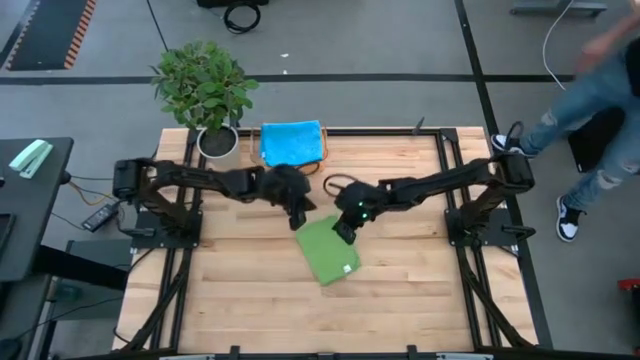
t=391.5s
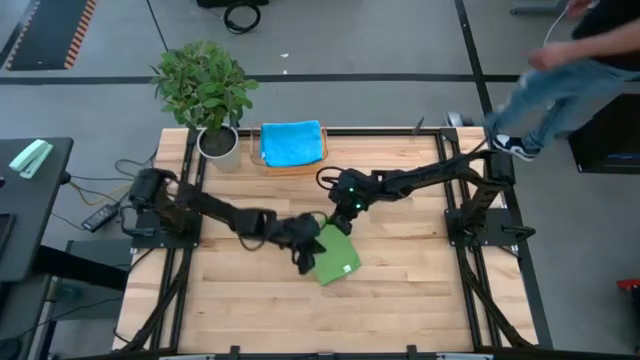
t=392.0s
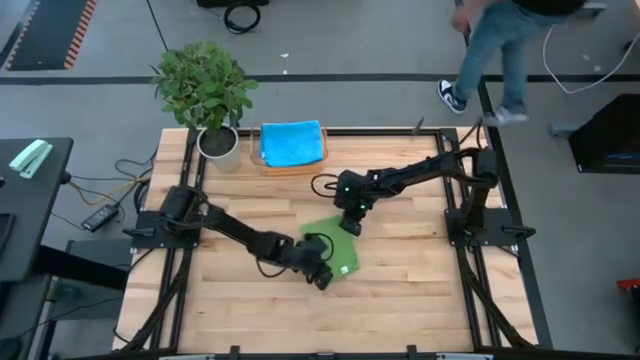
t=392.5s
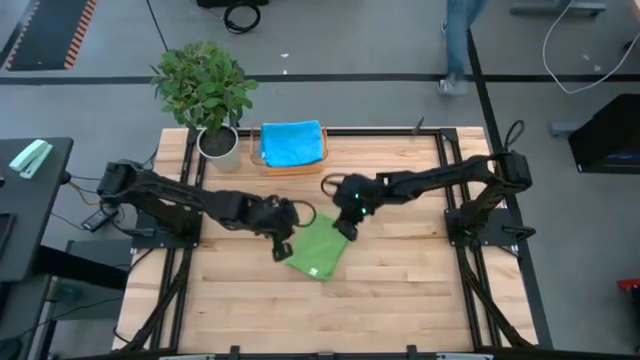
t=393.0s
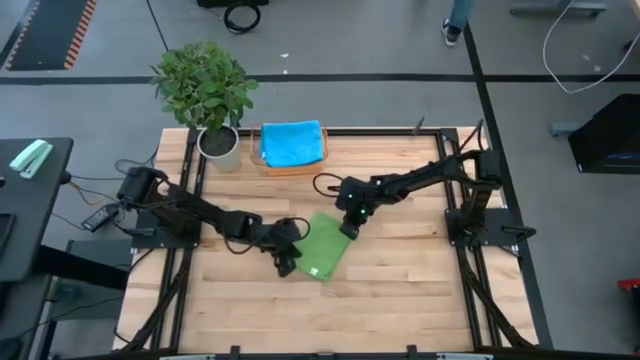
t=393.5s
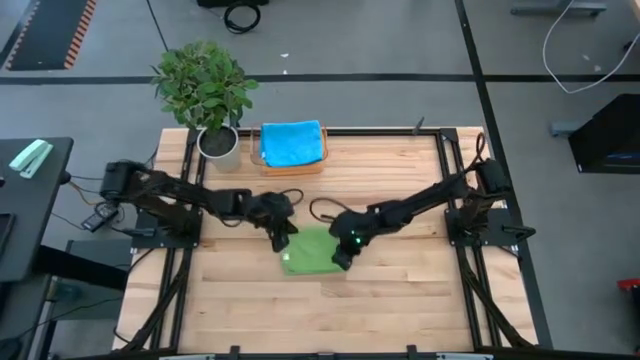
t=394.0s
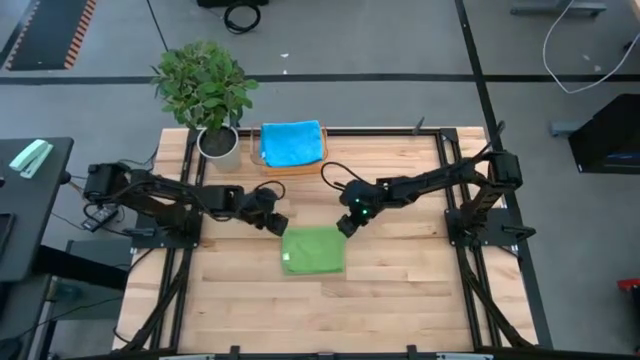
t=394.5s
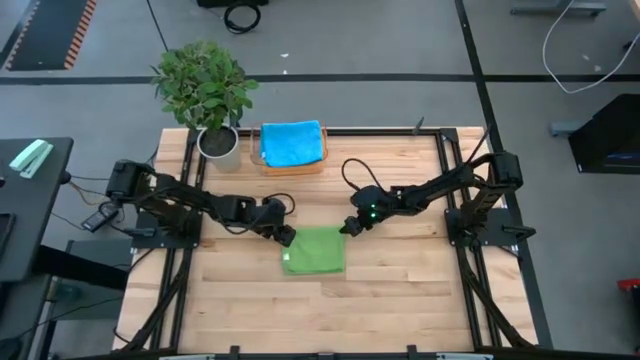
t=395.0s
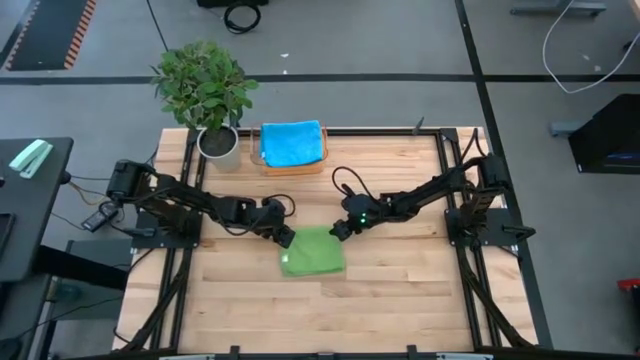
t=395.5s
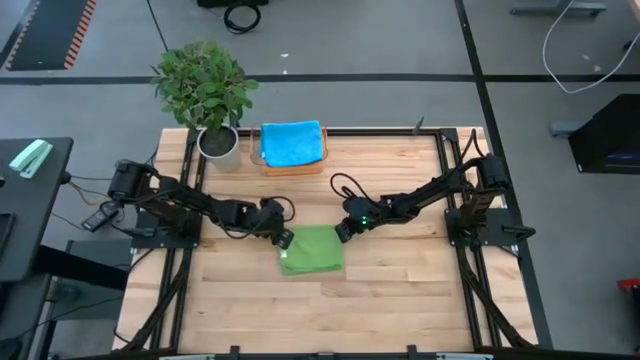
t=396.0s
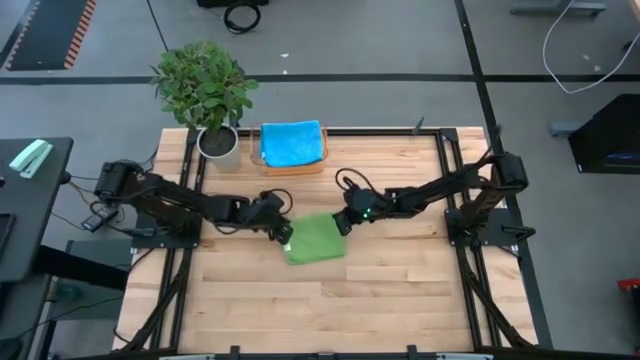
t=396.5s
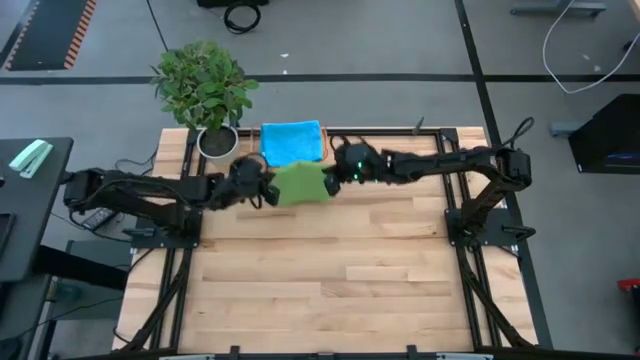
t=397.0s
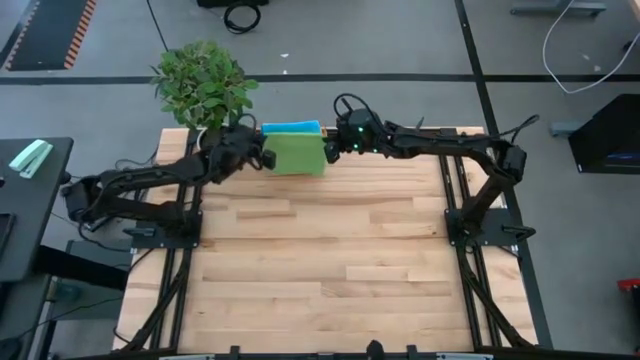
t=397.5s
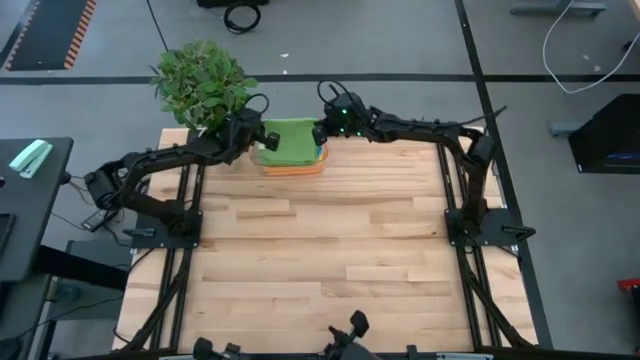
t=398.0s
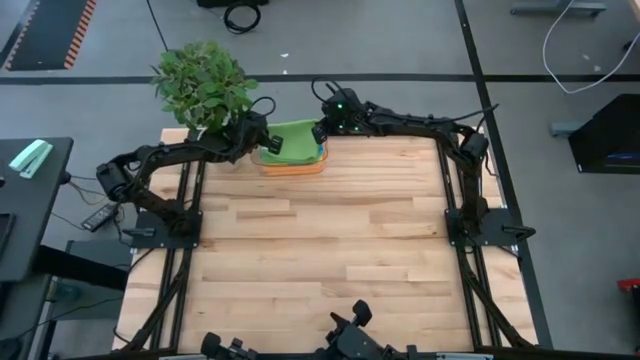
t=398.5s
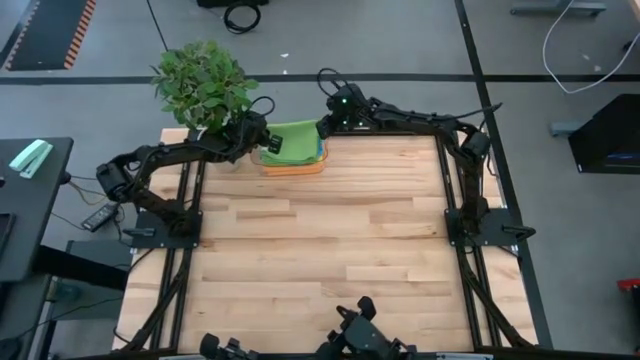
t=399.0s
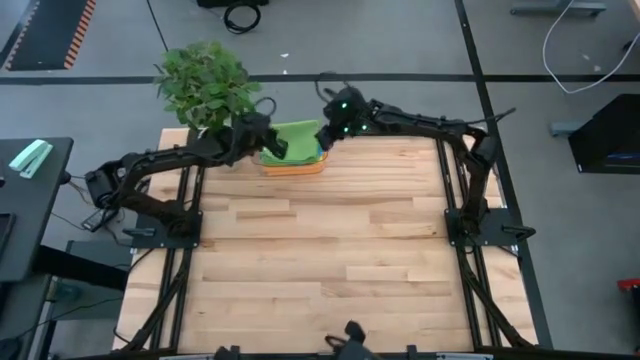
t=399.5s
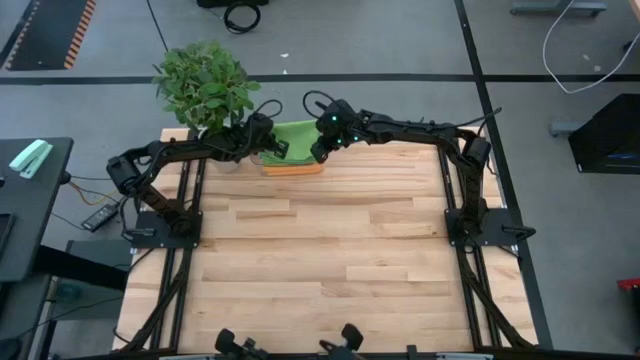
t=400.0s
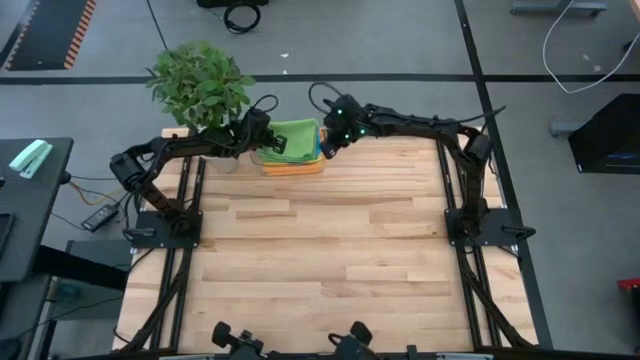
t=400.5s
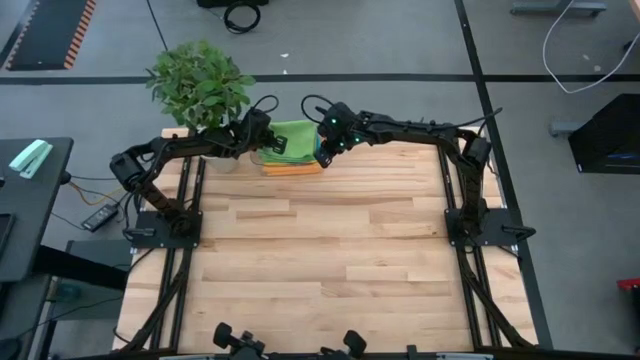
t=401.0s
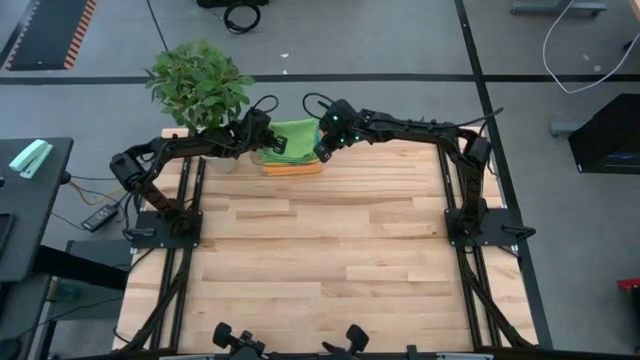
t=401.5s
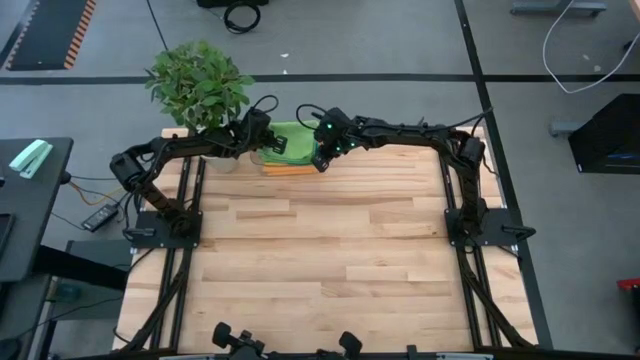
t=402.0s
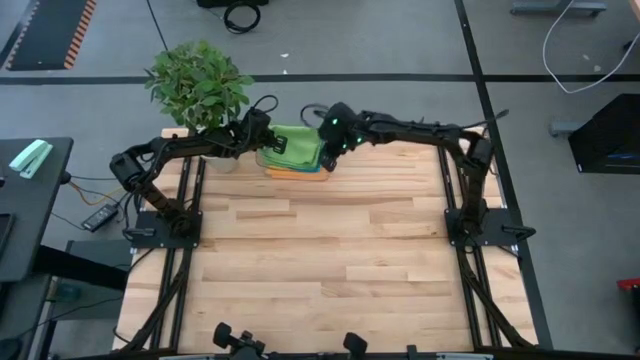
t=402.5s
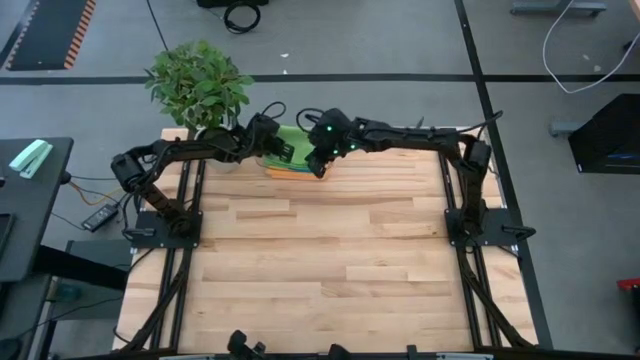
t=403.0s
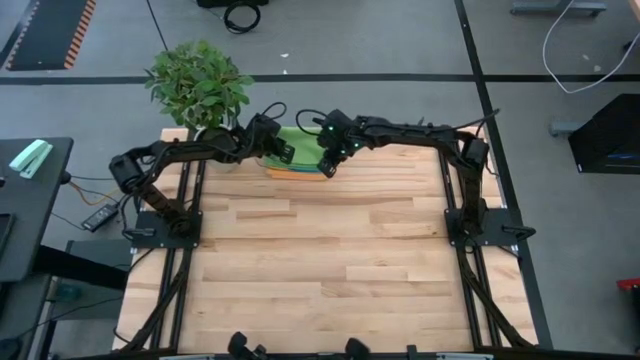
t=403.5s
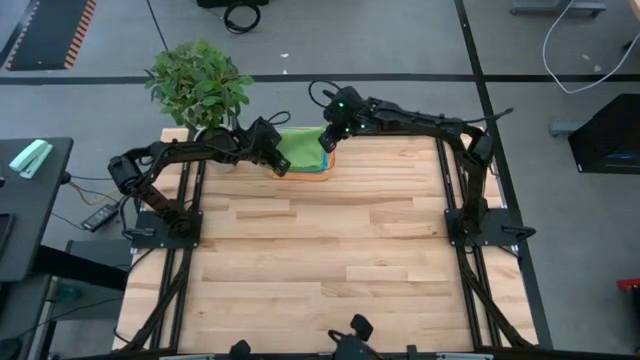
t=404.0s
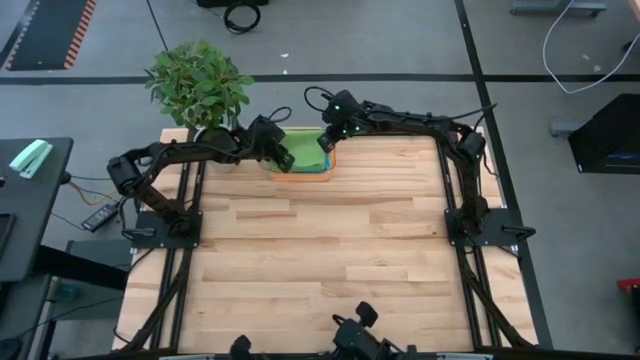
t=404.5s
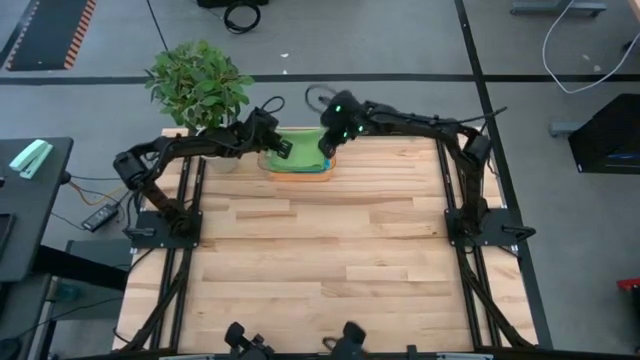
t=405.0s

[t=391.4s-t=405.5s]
Task: Fold microfiber towels
Stack the folded green microfiber cloth on top of the blue microfiber cloth in the transparent bin

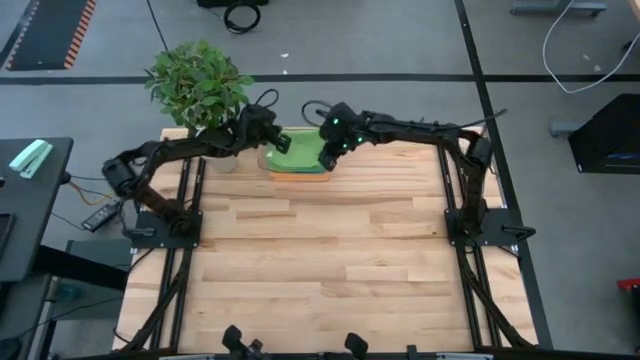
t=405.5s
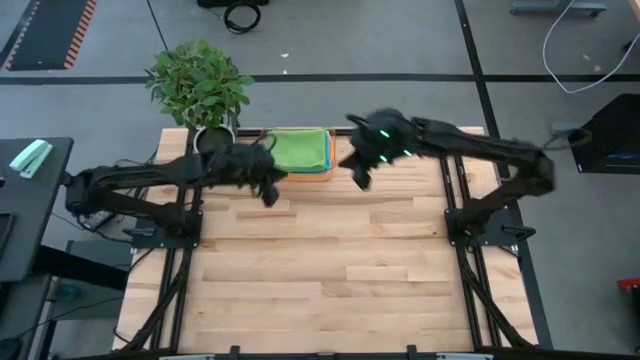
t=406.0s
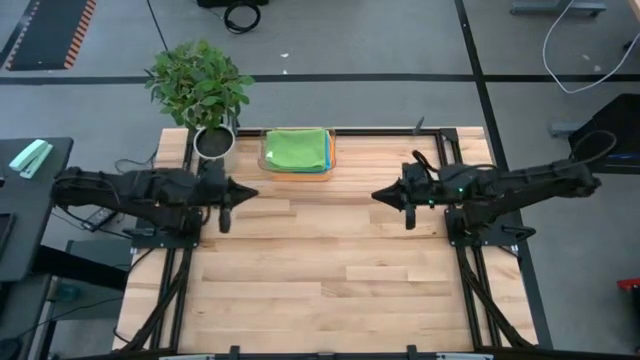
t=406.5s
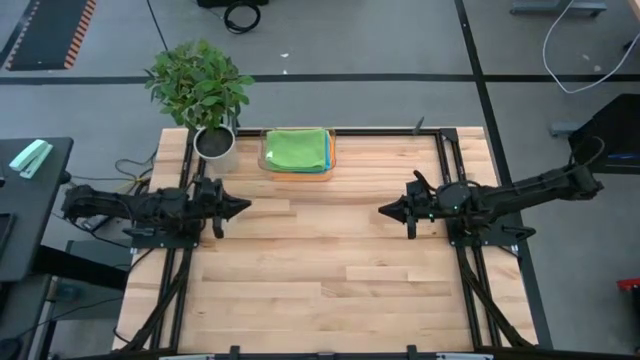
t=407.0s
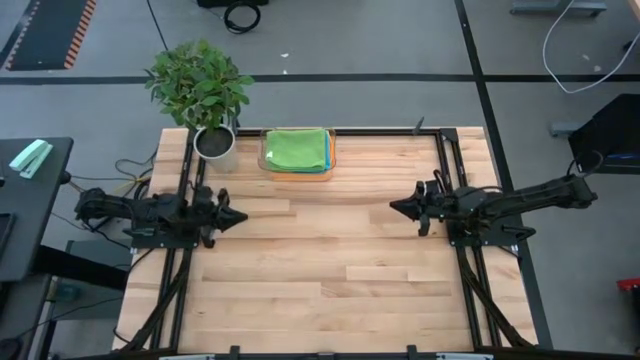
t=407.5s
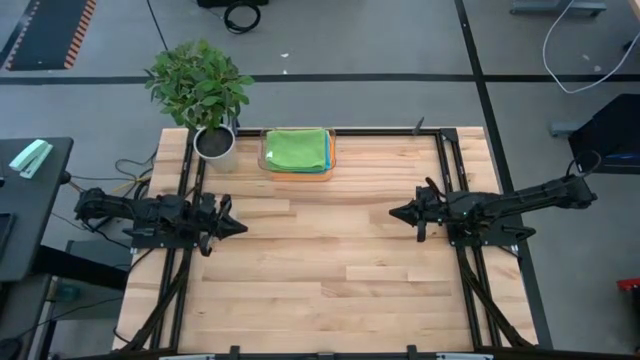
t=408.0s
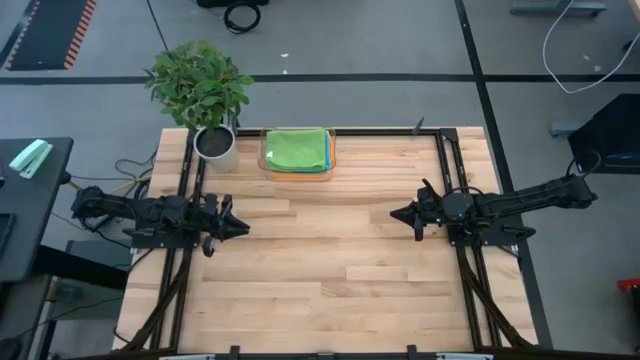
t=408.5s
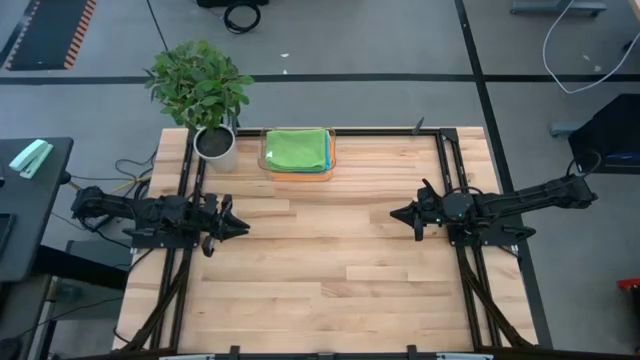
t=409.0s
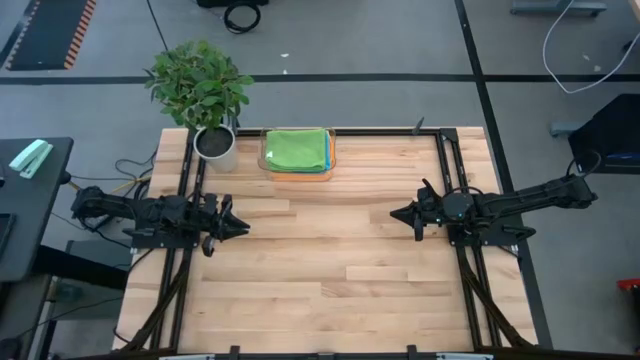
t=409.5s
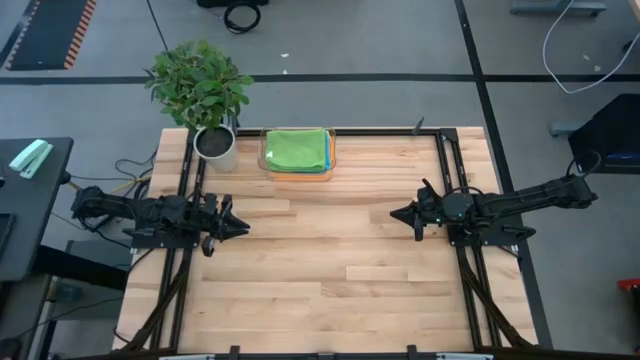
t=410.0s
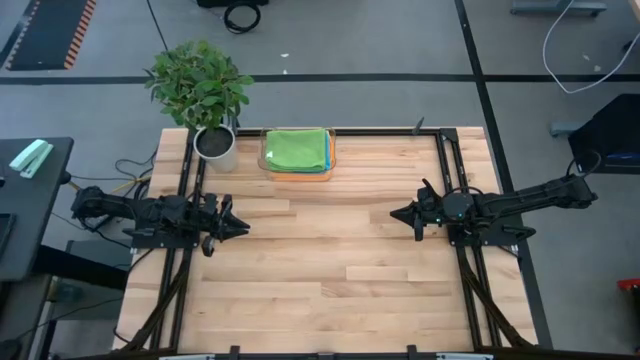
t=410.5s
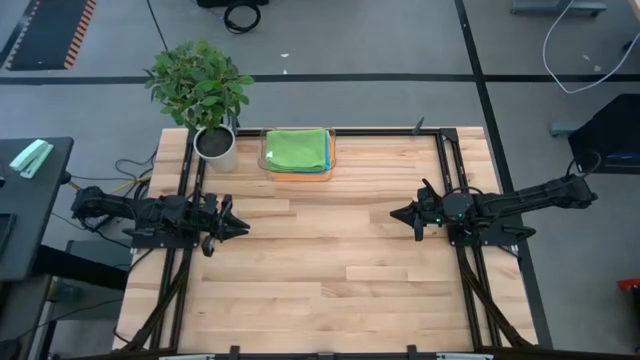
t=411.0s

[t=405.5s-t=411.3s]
Return to Home Position

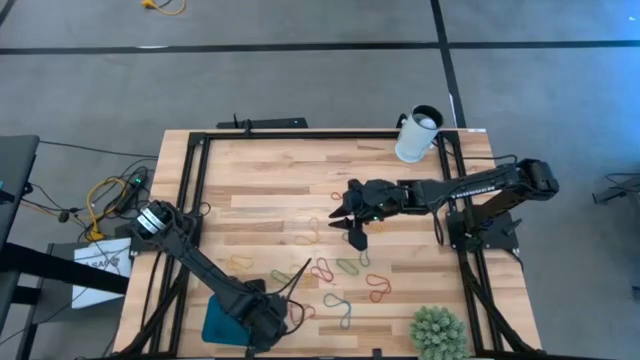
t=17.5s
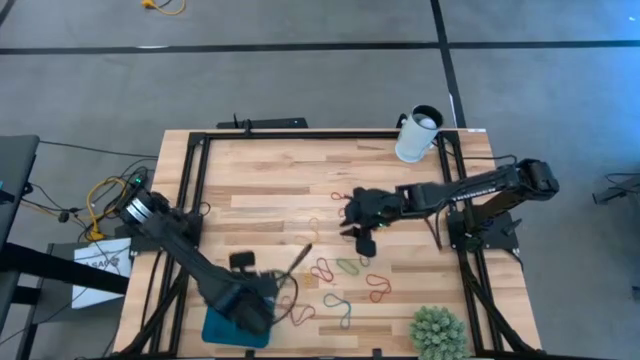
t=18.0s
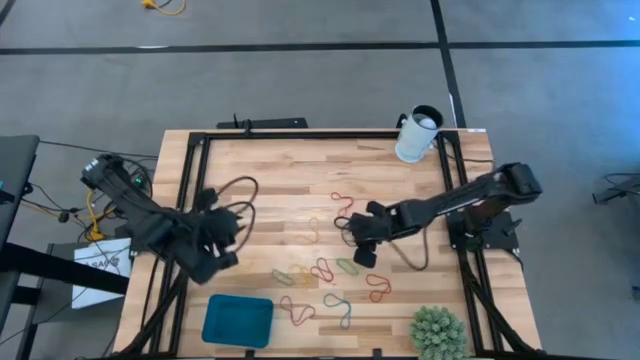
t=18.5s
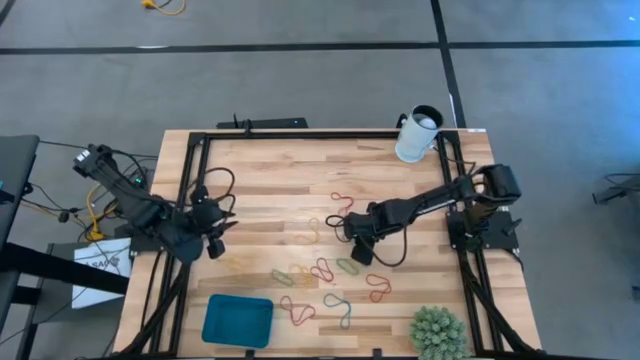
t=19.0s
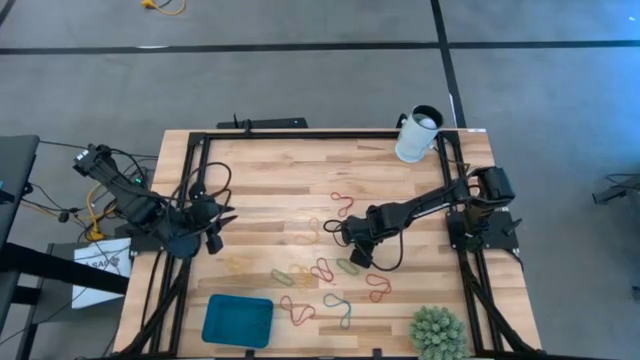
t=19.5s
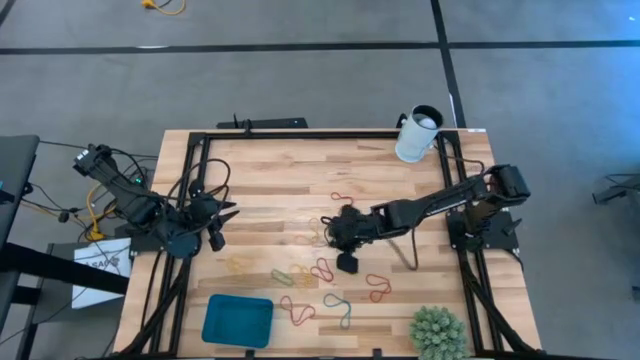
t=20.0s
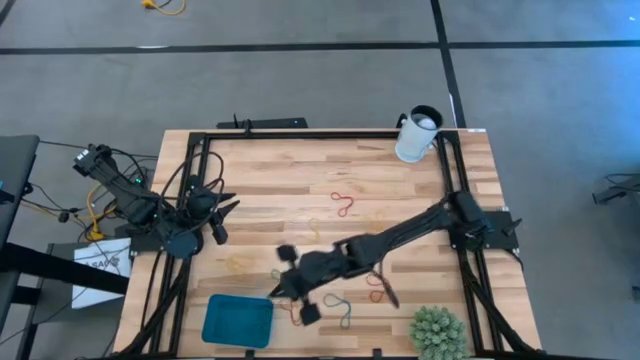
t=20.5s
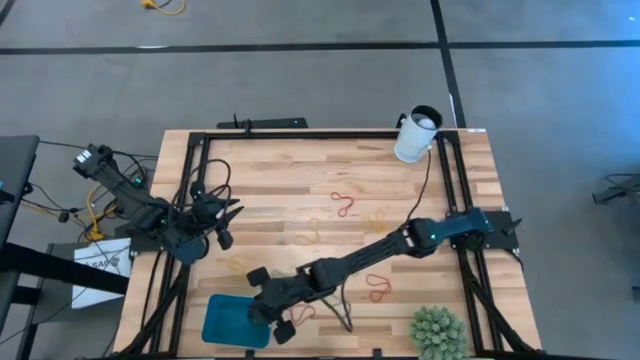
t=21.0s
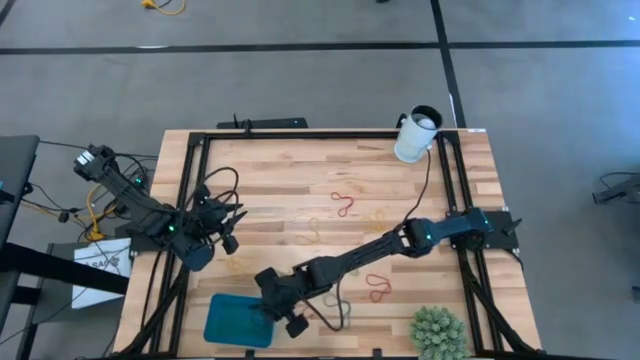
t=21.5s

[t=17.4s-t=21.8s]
Task: Pick and place items into bin
Put the blue rubber band into the blue bin
